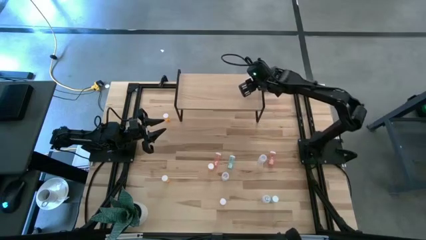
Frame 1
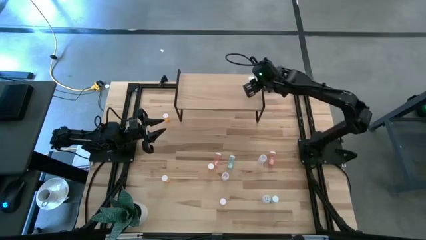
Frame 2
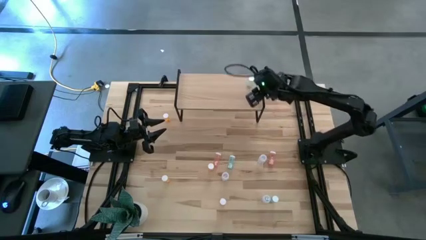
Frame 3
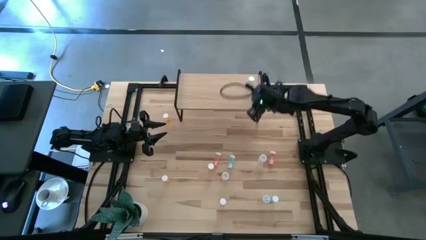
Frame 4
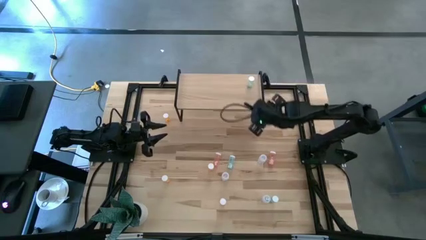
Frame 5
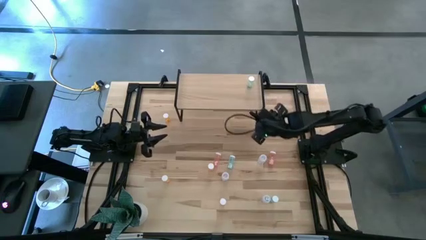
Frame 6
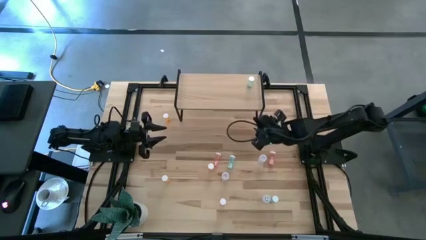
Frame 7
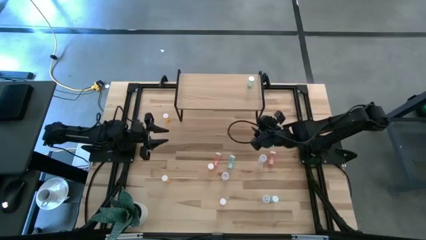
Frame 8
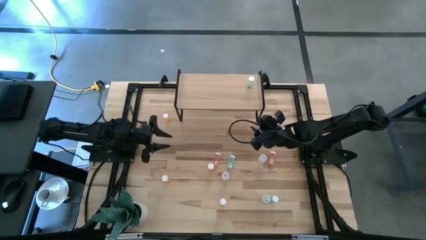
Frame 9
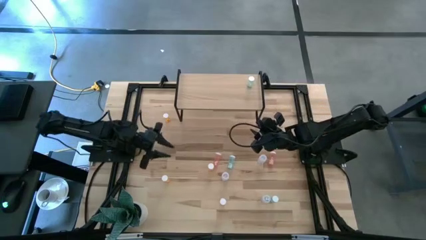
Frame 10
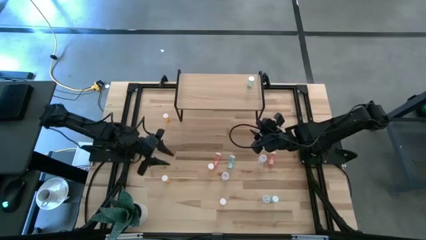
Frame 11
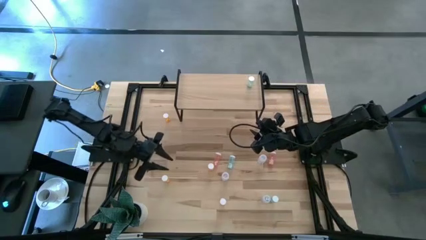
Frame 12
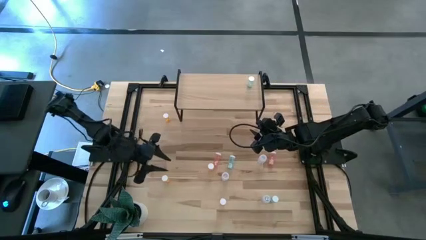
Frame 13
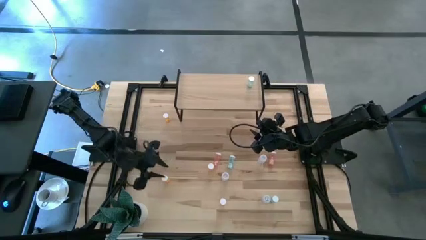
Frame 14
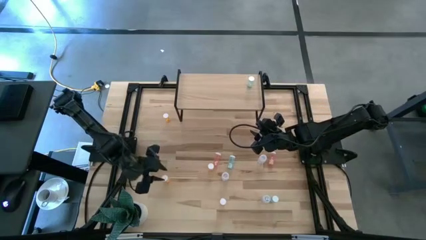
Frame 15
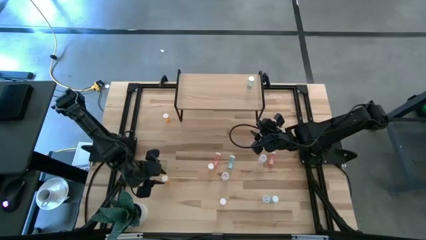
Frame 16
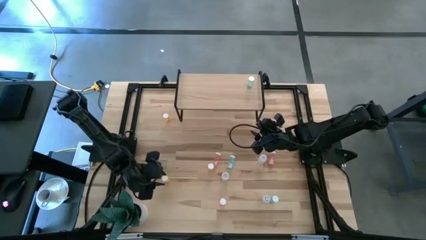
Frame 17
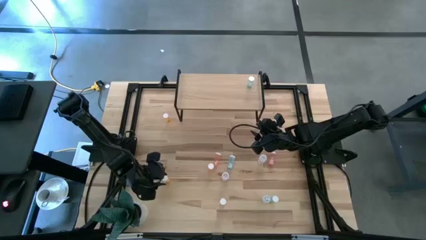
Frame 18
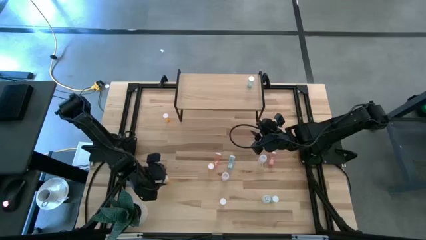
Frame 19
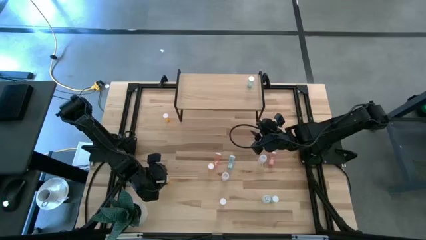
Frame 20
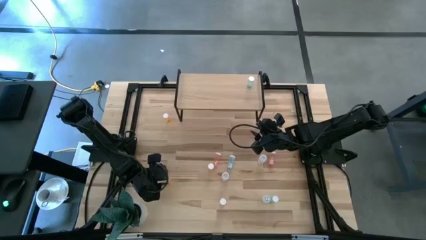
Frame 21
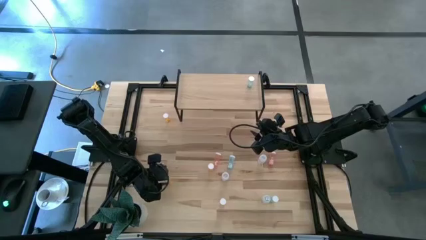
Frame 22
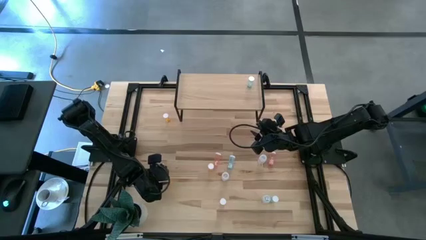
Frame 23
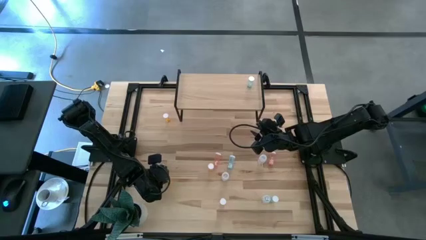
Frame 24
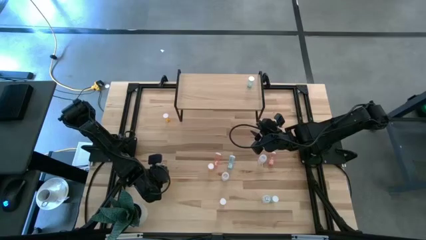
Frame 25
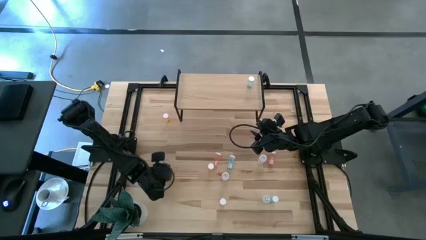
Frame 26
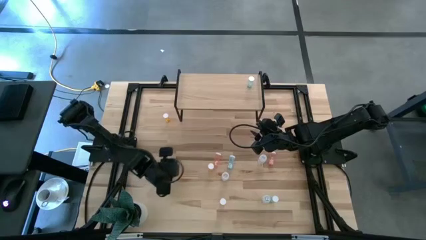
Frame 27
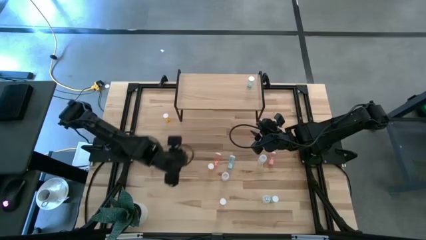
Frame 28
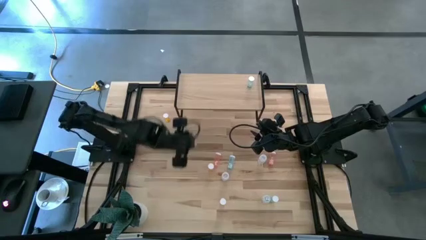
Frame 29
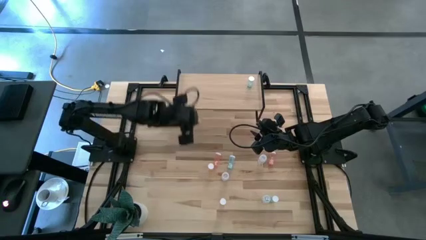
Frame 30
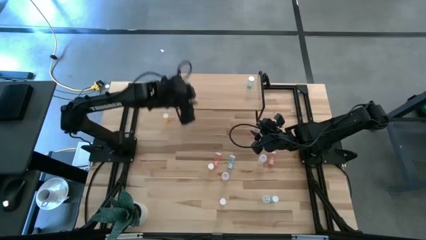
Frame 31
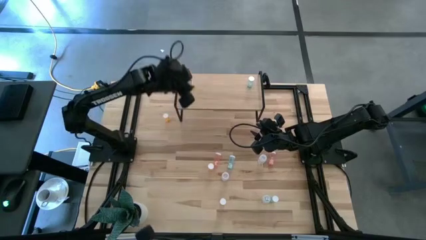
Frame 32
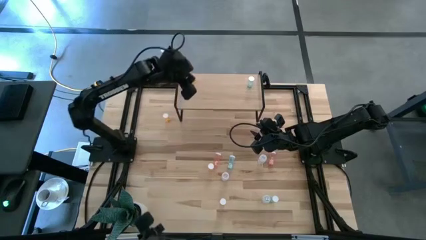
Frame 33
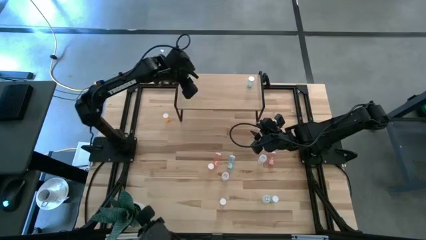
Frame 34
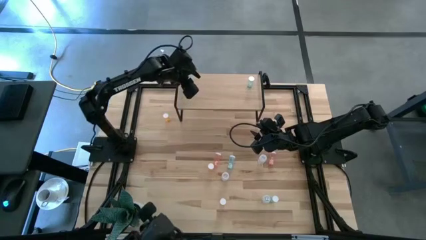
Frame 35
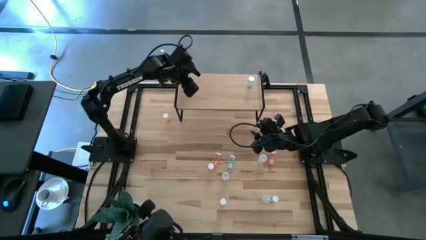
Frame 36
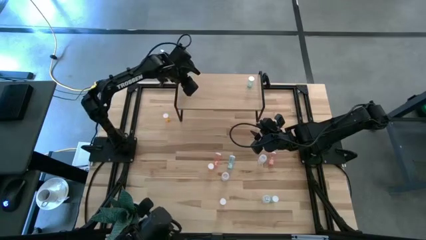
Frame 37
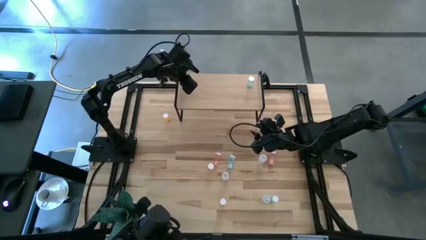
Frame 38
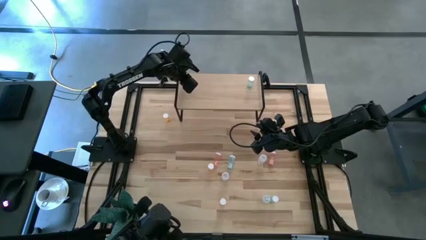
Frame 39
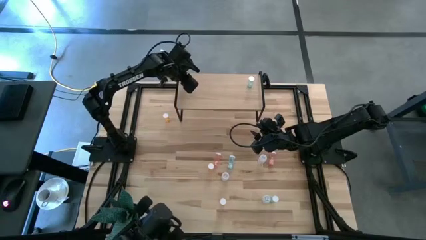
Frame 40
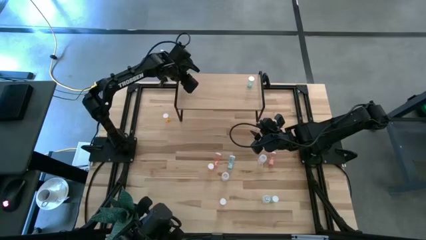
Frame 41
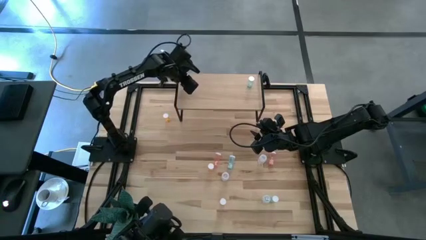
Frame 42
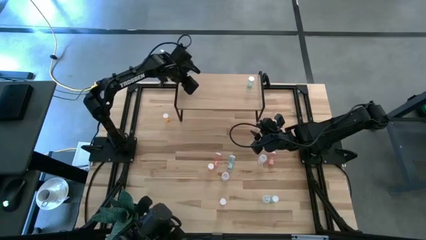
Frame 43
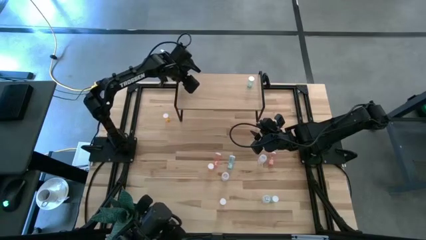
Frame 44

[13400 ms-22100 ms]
Task: Pick and place medicine bottles onto shelf by color
Put the bottom orange pill bottle on the shelf

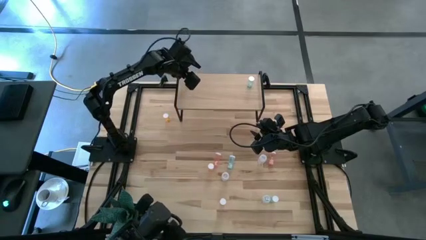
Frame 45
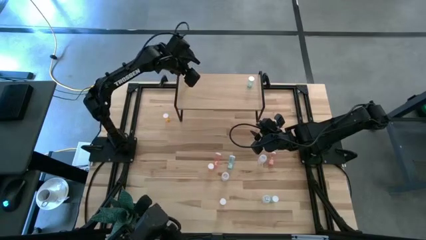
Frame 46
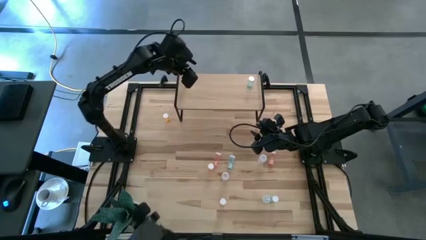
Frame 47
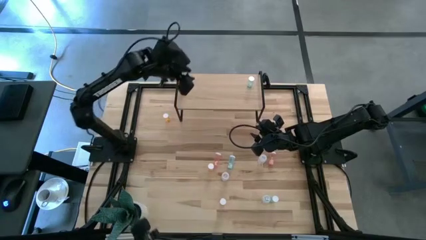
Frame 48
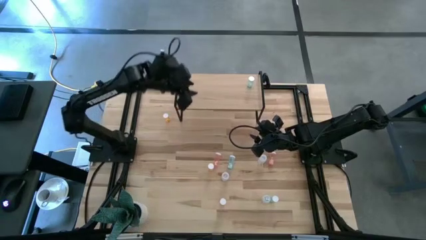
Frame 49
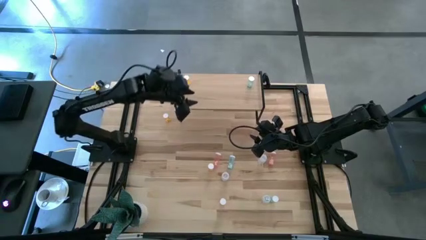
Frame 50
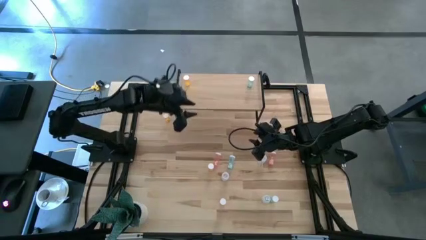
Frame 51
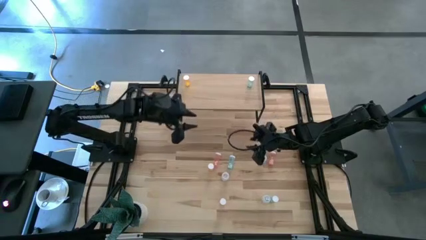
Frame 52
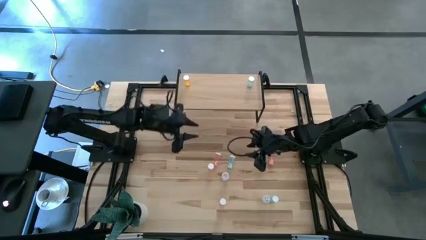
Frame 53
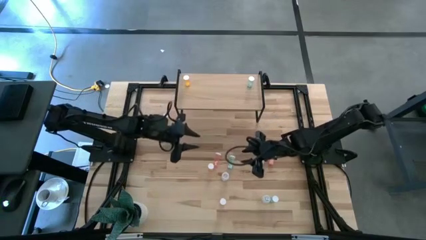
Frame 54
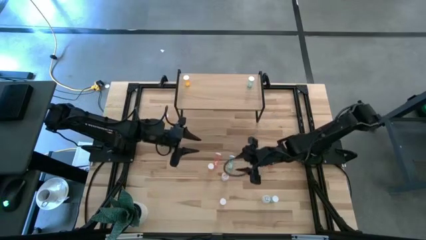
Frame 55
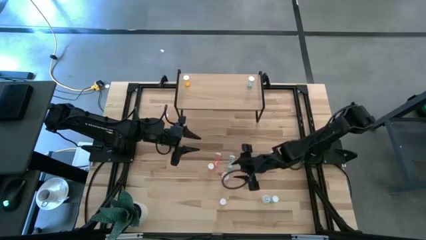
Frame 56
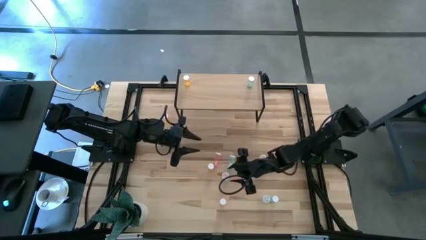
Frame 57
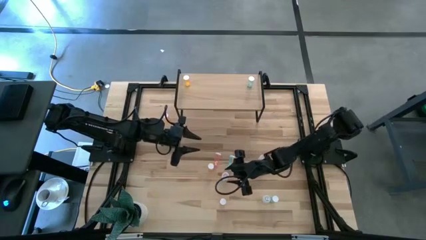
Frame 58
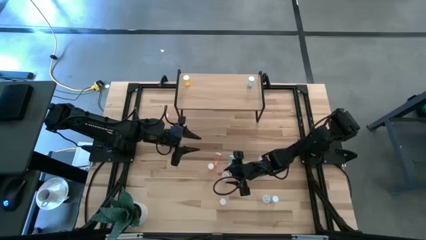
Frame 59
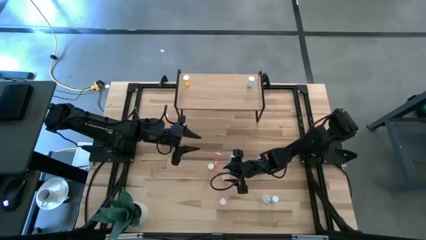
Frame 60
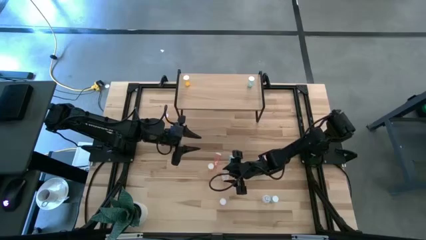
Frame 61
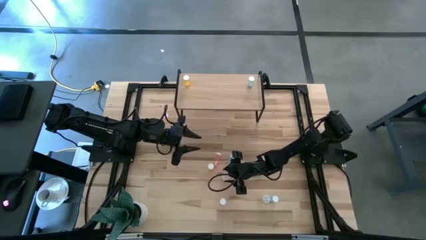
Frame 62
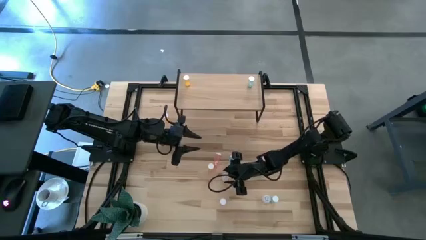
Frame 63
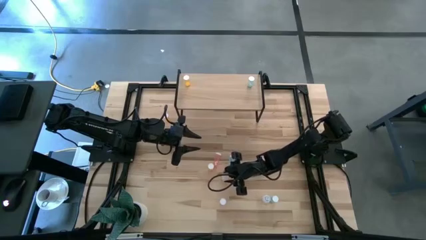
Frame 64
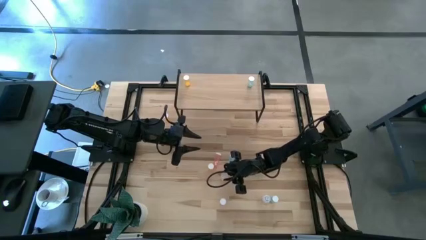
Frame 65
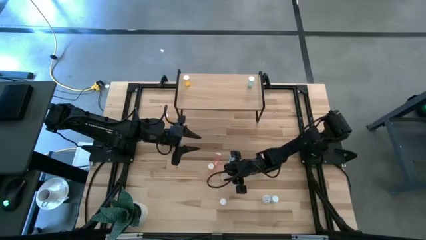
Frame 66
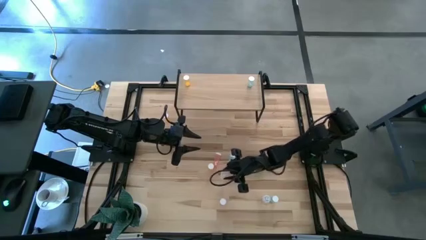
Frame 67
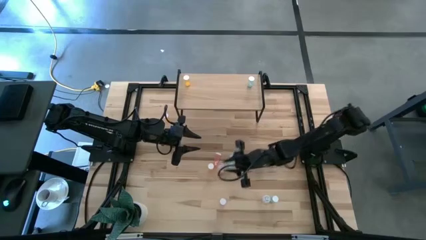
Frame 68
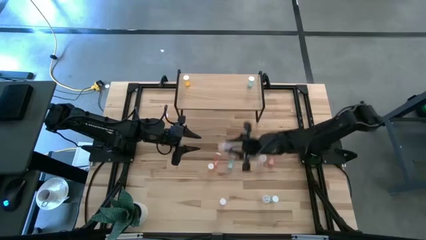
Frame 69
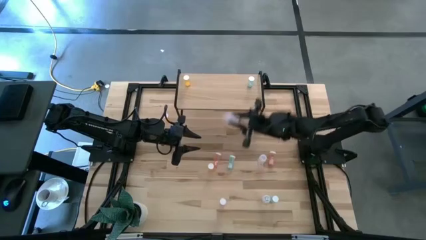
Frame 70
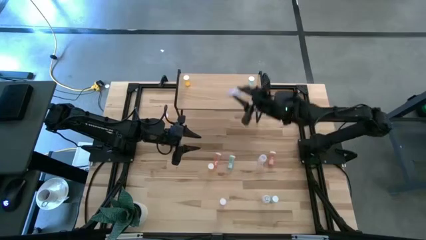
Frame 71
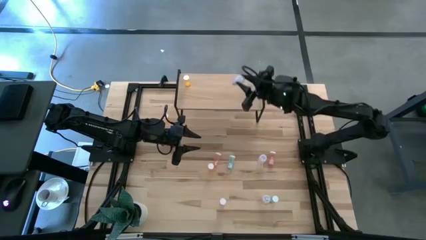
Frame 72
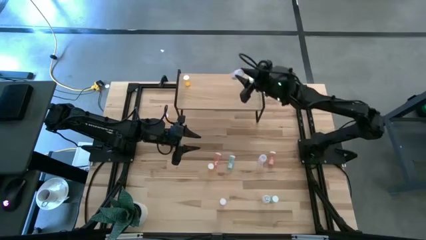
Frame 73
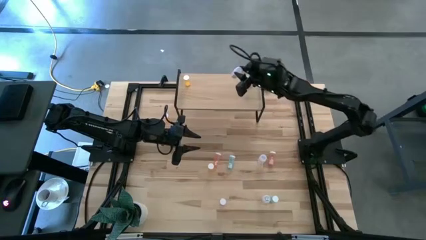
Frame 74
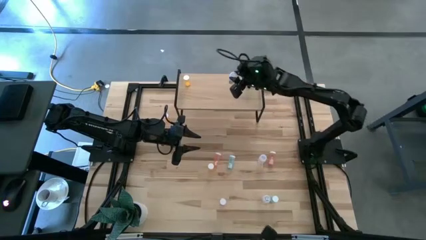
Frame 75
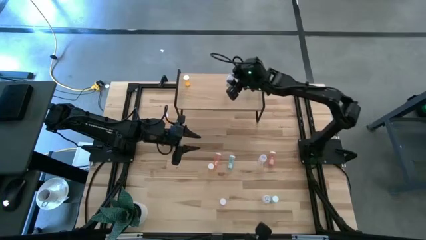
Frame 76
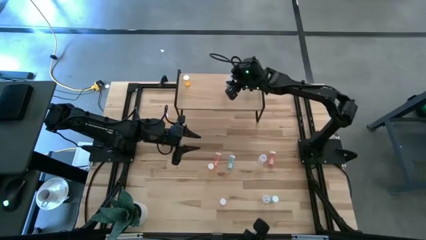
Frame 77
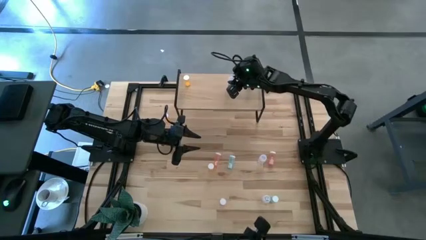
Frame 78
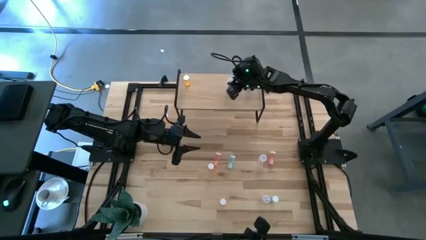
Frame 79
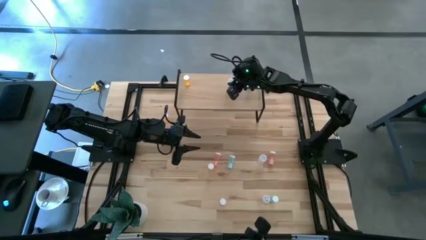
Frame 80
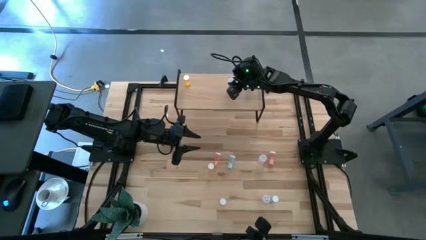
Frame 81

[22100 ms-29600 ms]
Put the left white pill bottle on the shelf
